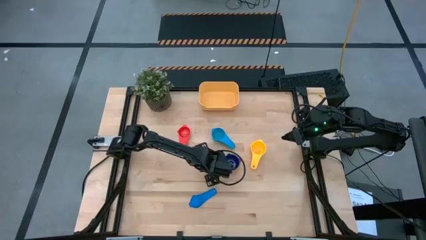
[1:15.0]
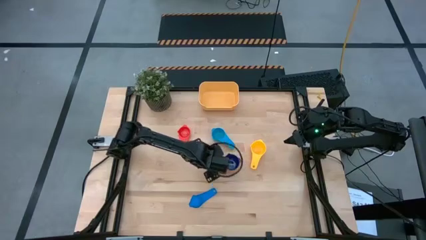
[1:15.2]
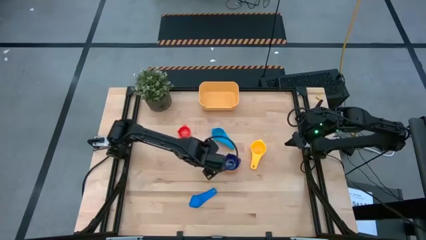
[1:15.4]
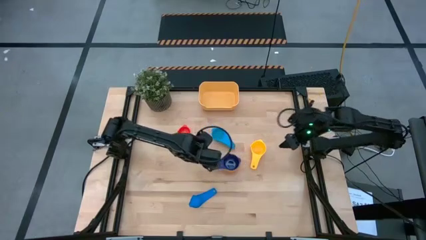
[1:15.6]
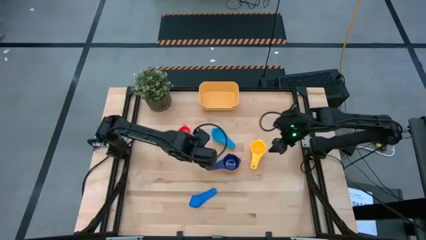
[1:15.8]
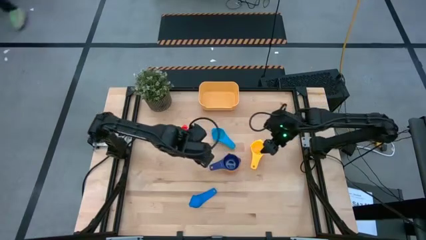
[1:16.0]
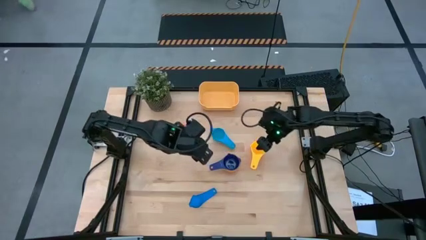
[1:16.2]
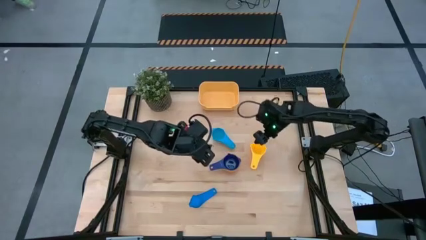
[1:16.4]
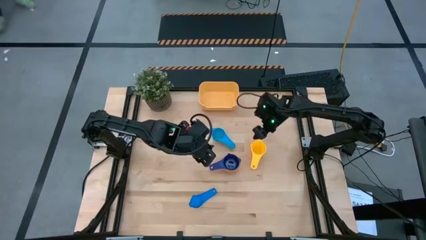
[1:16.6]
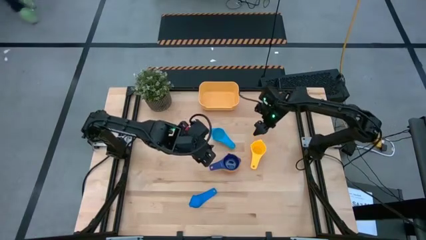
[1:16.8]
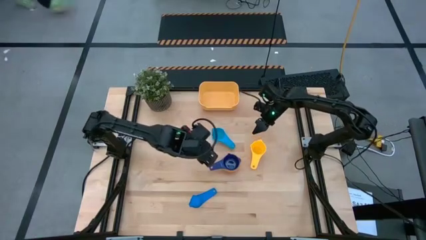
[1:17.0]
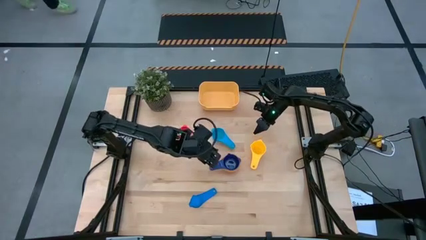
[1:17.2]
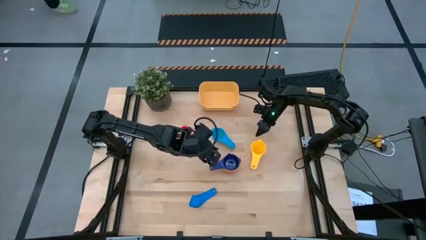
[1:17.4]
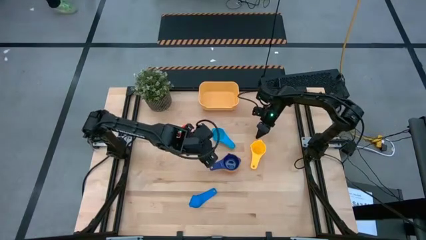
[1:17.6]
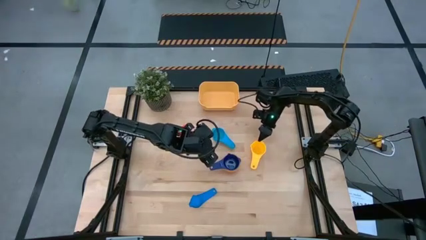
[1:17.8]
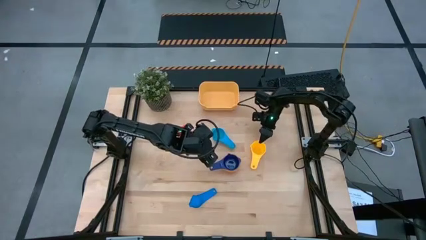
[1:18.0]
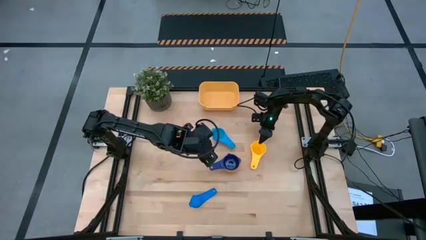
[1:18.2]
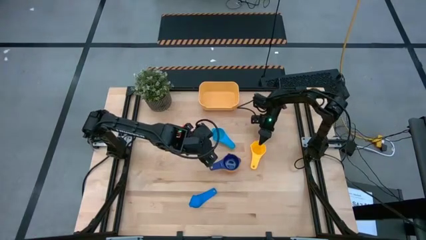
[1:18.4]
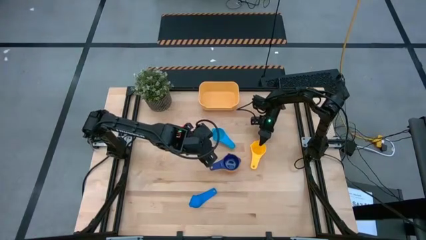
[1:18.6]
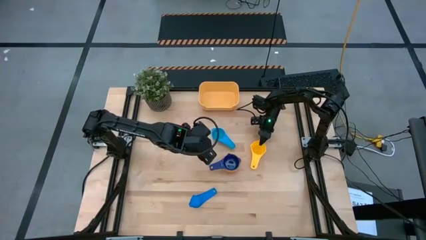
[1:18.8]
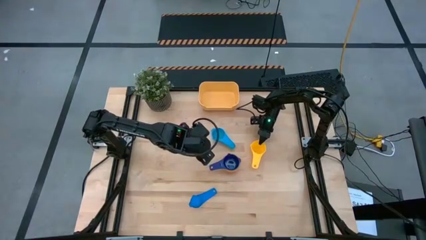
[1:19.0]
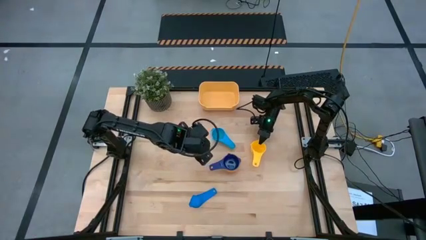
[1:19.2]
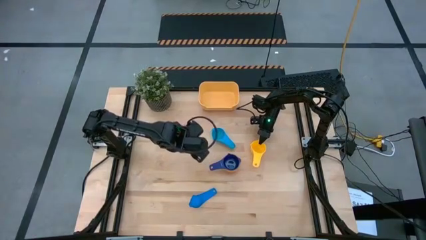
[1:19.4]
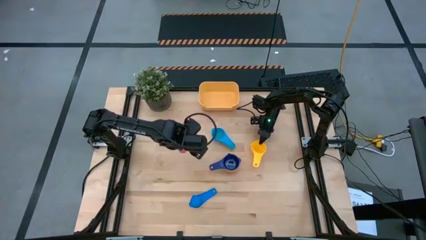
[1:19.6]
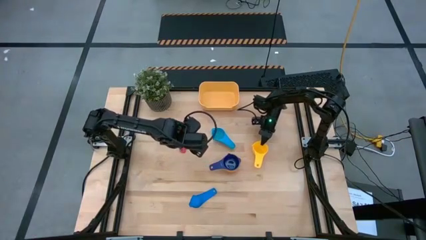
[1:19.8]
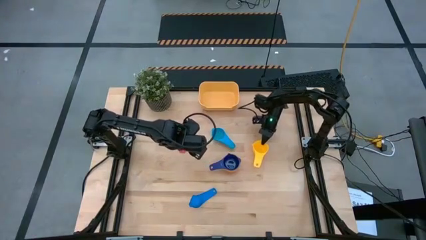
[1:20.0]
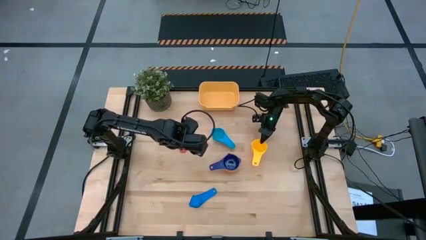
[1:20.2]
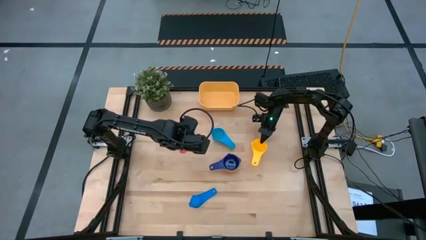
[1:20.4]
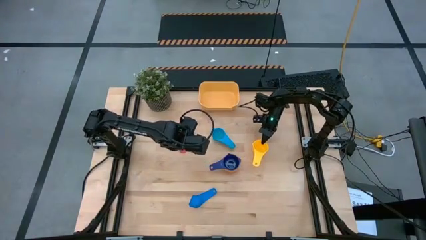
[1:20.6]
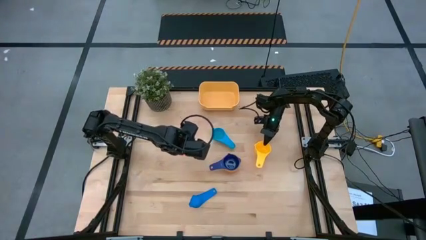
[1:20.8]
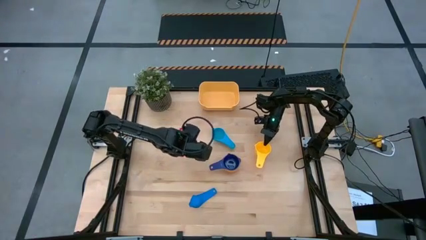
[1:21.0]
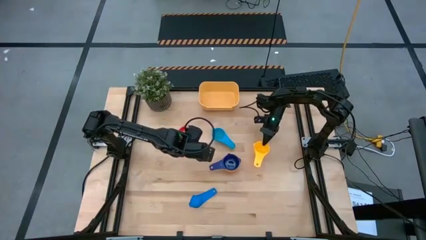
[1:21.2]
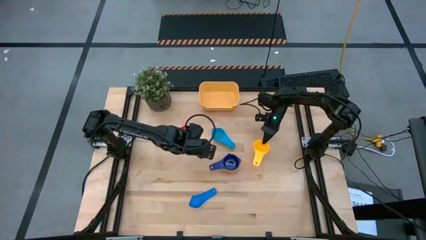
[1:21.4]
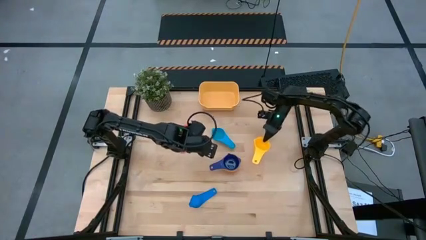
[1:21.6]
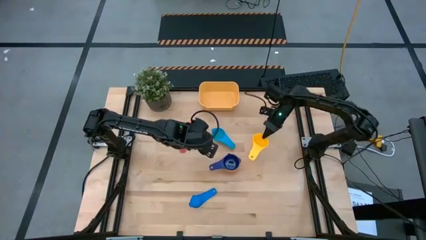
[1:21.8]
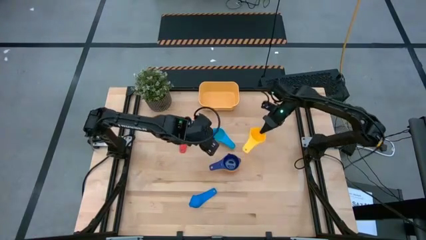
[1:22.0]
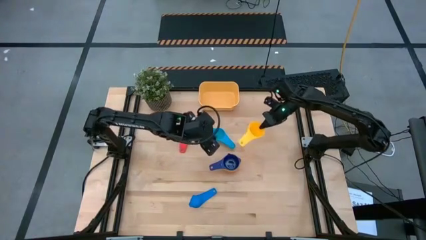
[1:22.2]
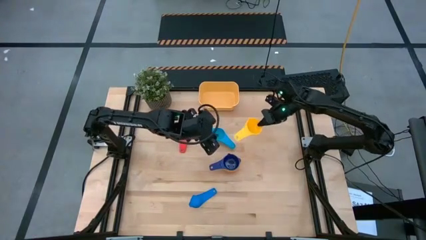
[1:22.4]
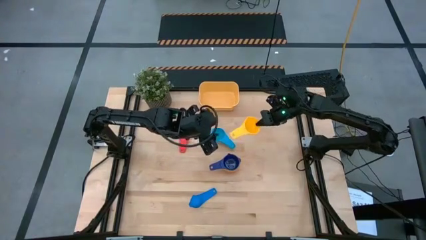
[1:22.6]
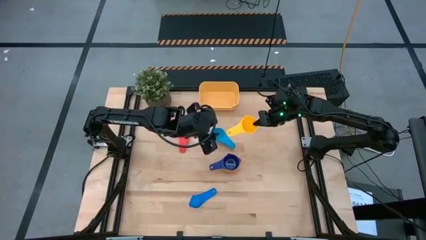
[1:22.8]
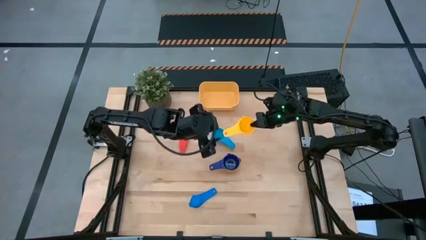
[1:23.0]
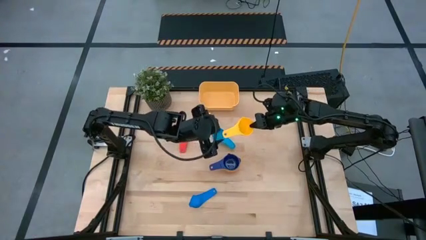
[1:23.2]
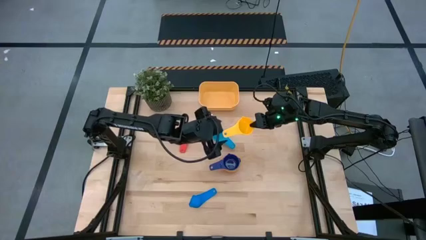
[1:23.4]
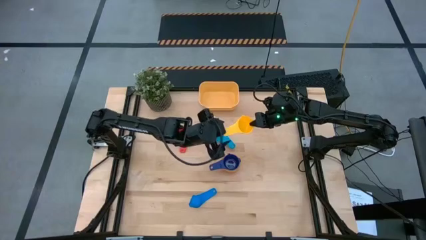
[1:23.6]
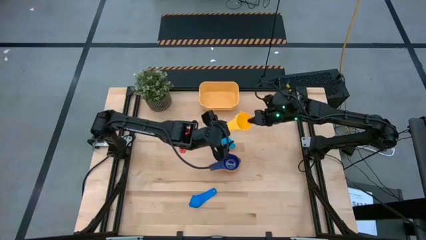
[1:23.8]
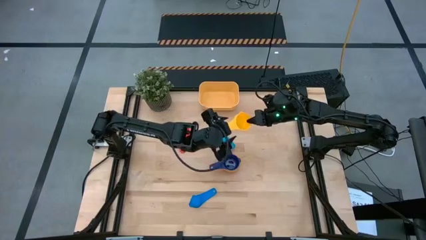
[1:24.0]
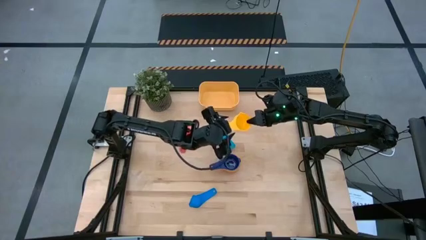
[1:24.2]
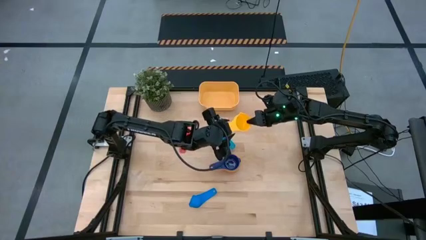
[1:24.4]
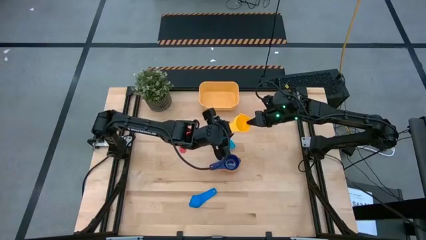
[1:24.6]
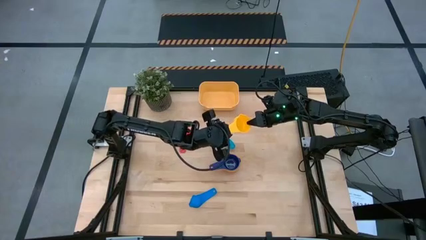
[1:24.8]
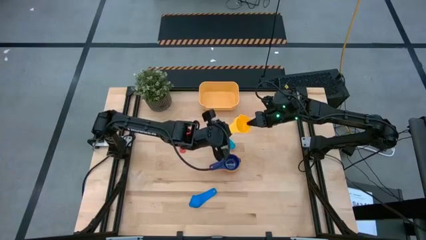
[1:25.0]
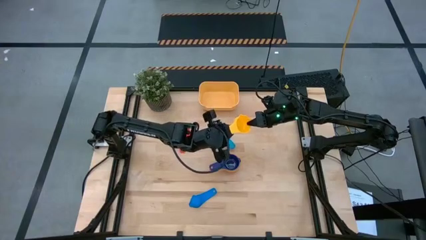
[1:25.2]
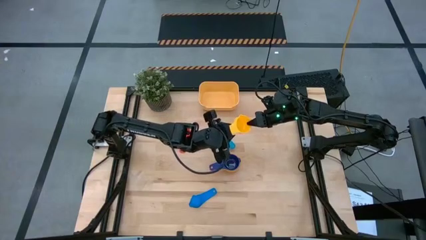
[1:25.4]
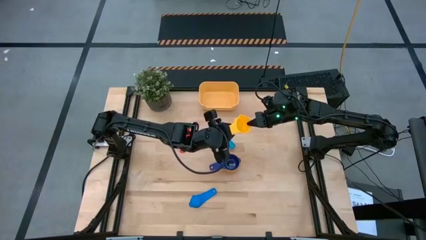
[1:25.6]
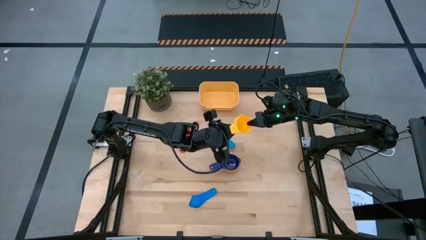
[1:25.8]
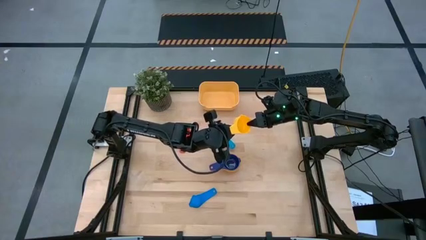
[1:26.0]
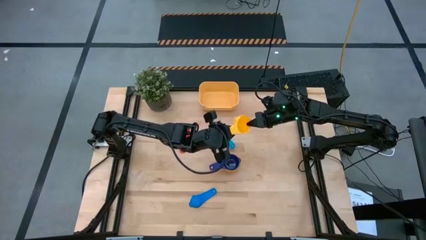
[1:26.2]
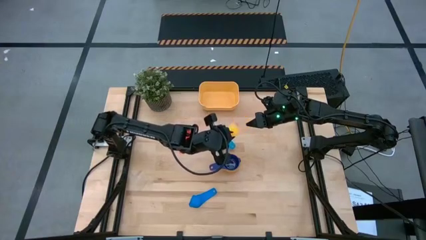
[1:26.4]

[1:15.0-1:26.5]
Task: Nest measuring cups in basket
Stack the yellow measuring cup on top of the dark blue measuring cup

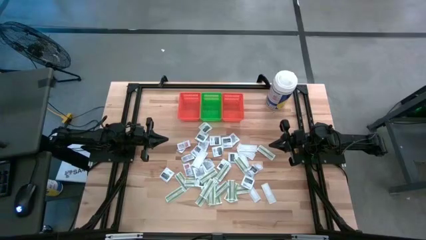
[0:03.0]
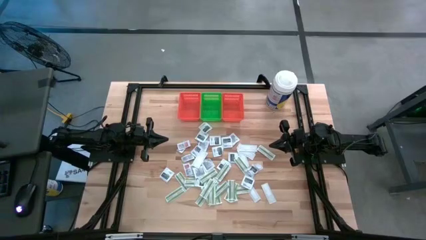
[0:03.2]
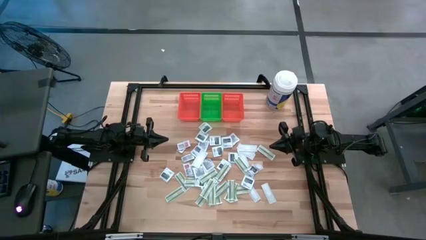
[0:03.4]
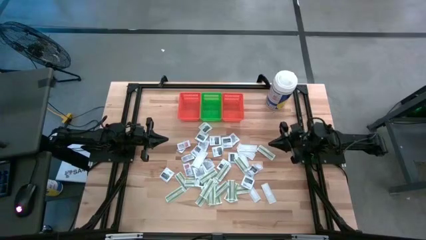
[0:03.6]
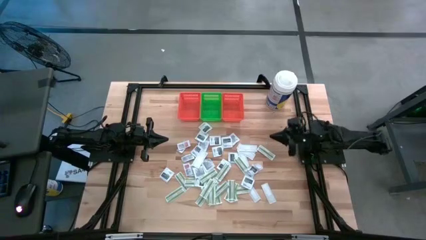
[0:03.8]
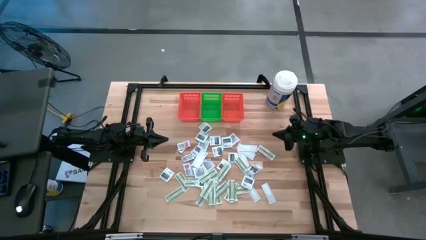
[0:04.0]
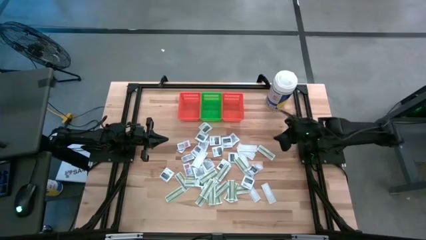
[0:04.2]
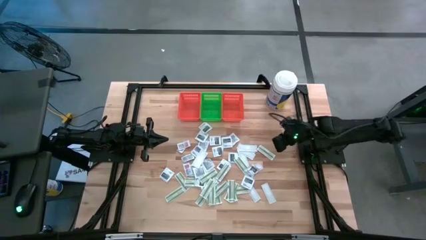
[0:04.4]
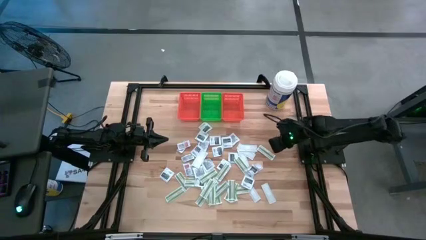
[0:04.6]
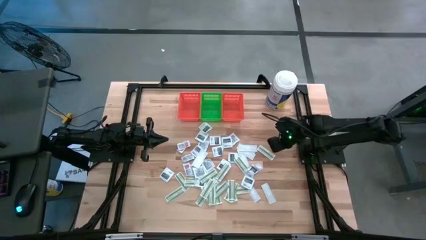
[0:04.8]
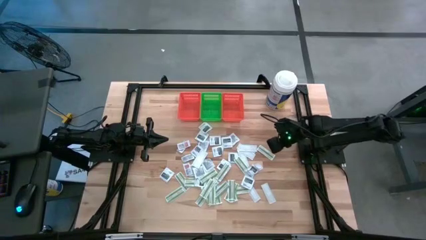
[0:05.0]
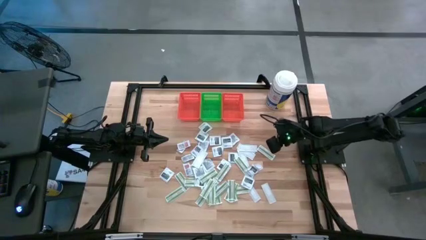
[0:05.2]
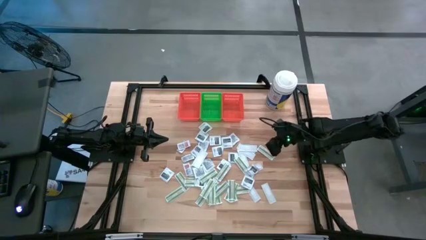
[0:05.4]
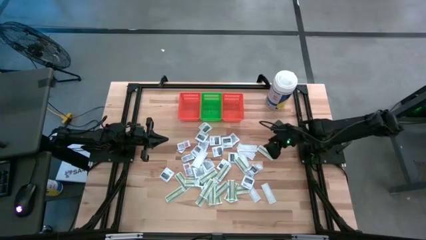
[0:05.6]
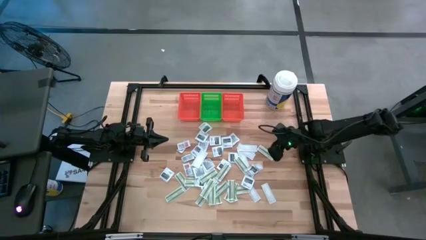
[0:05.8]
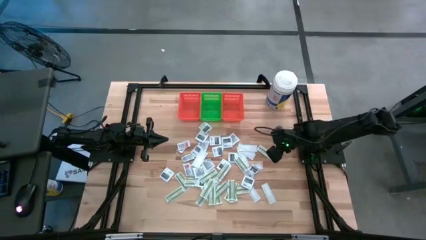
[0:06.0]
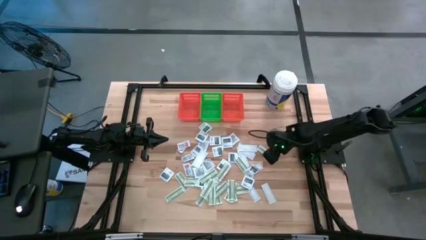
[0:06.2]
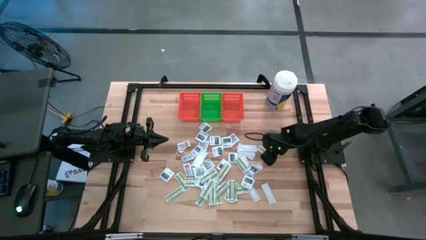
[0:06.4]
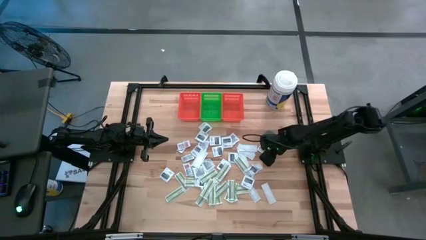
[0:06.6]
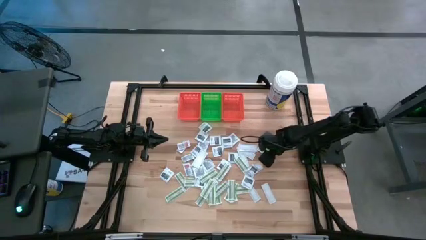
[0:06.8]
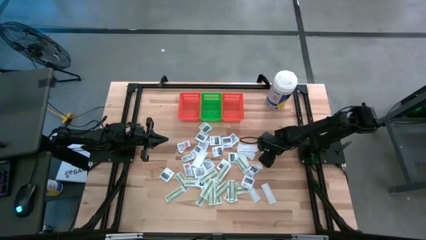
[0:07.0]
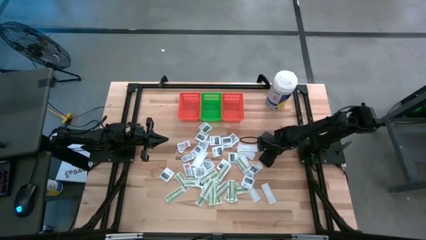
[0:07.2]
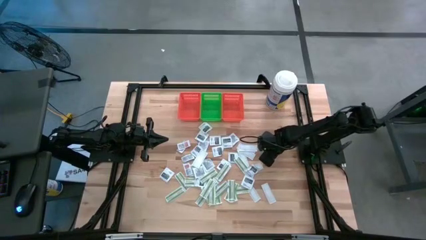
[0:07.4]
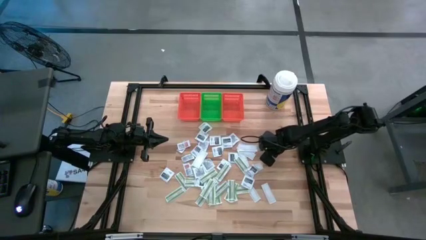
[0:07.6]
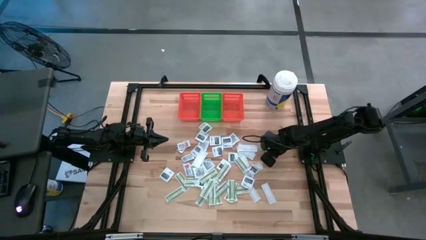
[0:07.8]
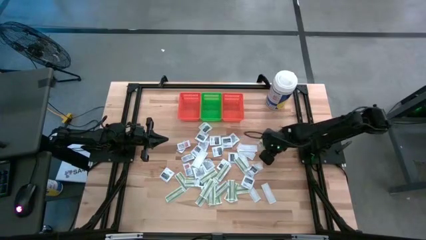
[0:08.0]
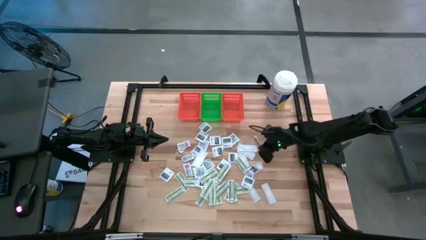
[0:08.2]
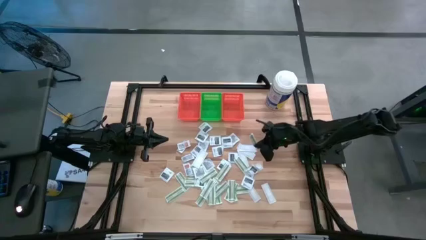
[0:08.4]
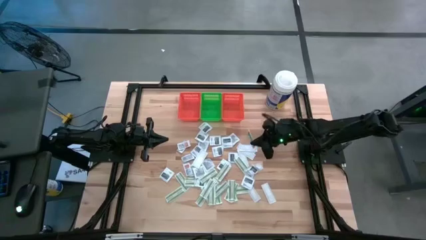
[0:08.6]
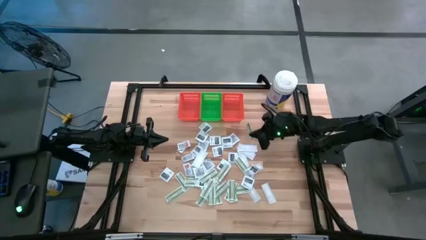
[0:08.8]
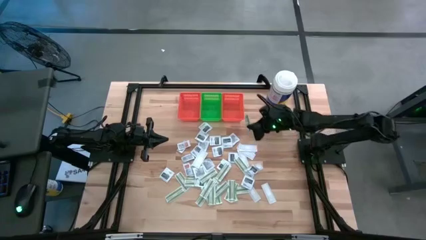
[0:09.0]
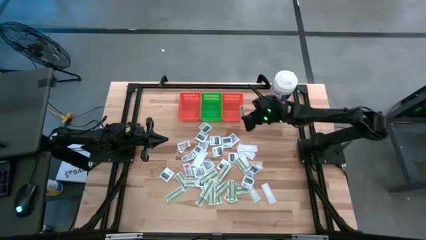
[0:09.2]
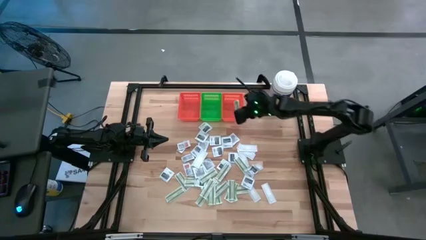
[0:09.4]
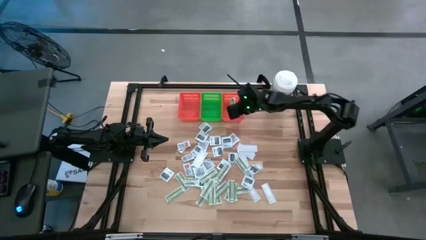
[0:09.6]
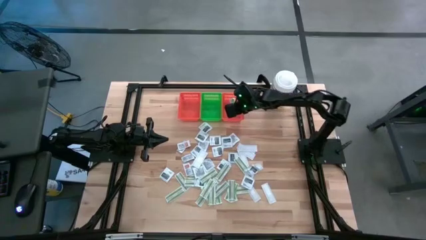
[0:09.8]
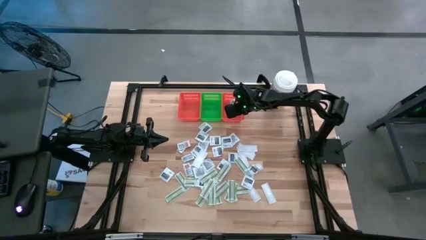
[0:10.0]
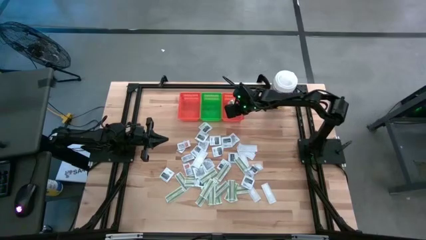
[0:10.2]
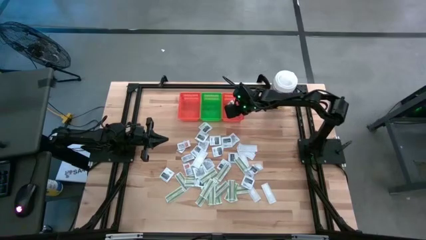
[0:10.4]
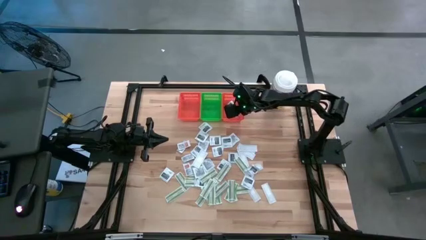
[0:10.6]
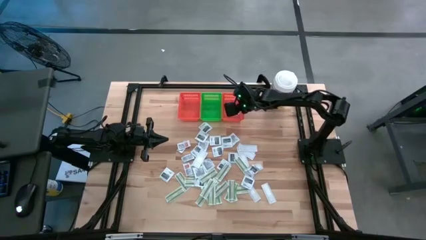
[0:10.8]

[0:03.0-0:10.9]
Task: Pick & Place First Aid Supplies
Put the bandage pack into the right orange bin
